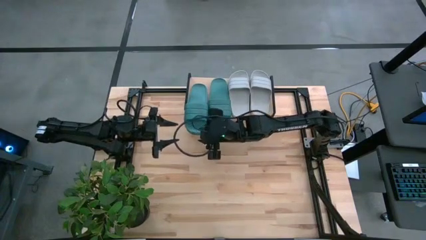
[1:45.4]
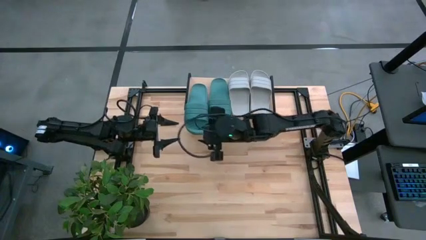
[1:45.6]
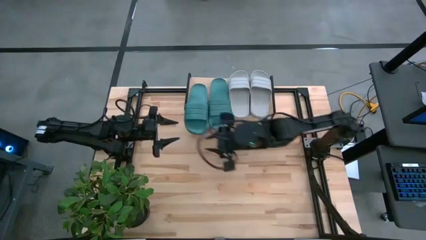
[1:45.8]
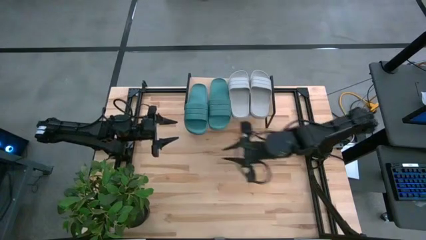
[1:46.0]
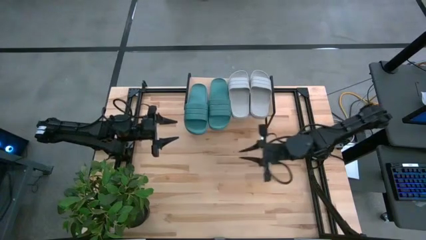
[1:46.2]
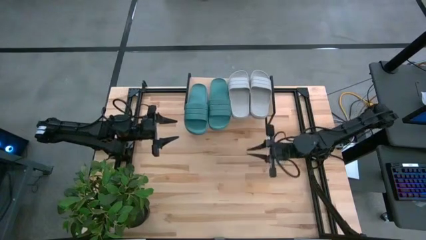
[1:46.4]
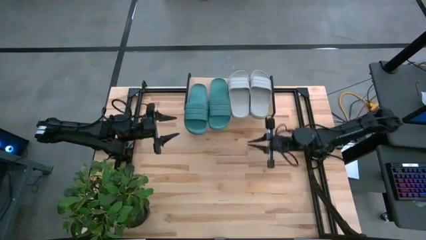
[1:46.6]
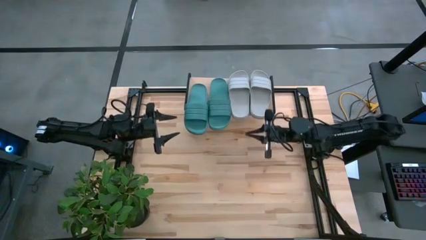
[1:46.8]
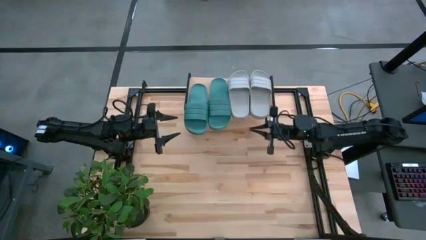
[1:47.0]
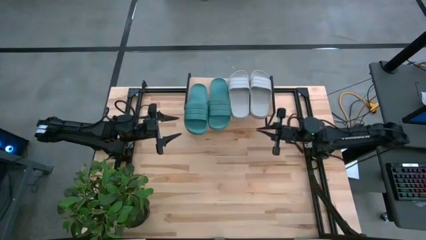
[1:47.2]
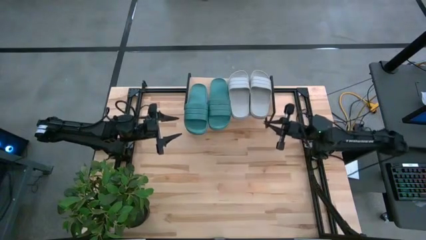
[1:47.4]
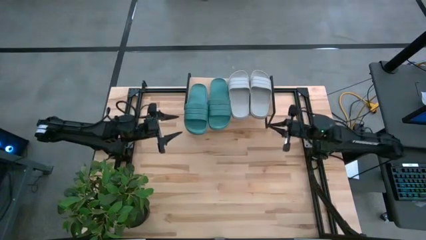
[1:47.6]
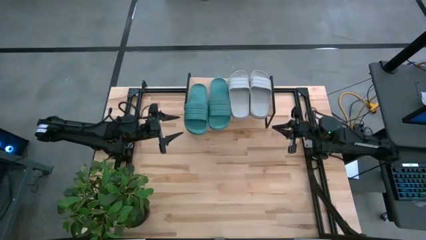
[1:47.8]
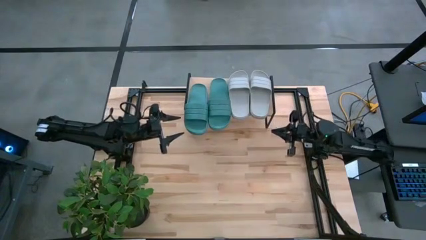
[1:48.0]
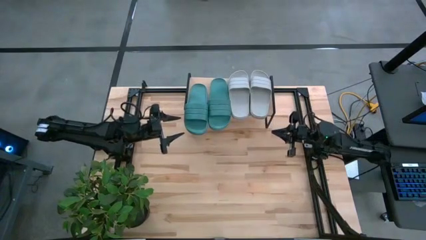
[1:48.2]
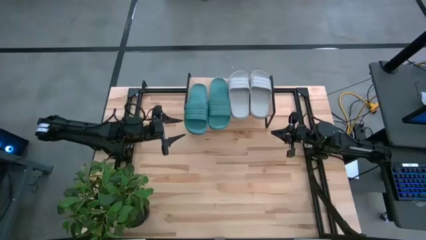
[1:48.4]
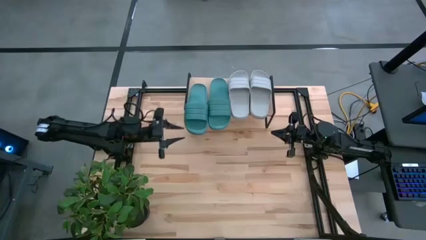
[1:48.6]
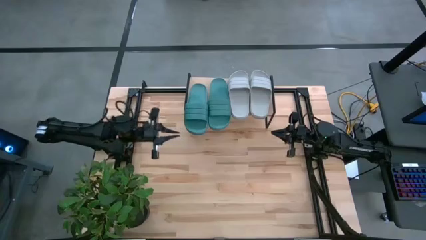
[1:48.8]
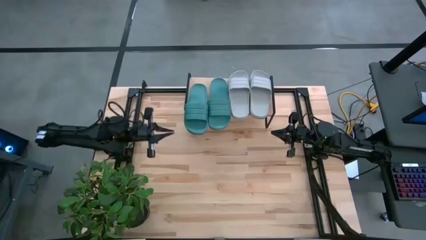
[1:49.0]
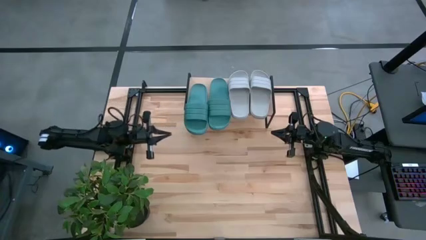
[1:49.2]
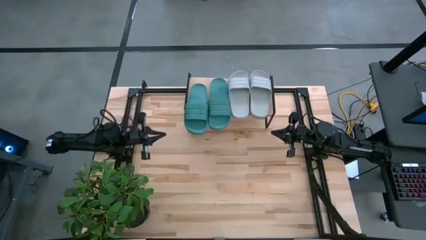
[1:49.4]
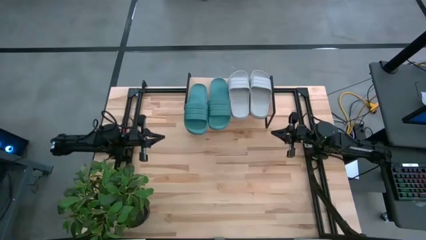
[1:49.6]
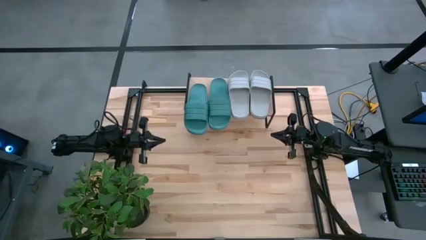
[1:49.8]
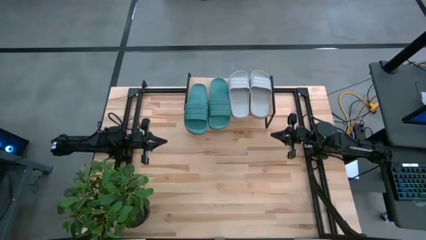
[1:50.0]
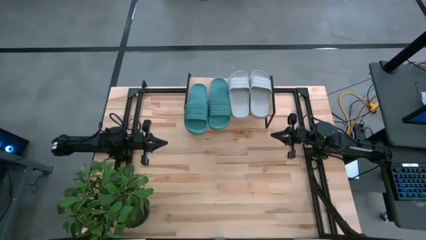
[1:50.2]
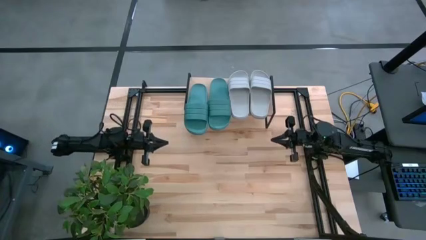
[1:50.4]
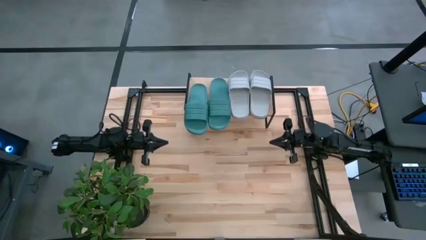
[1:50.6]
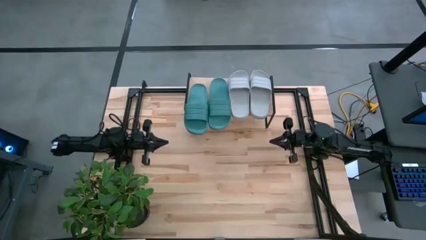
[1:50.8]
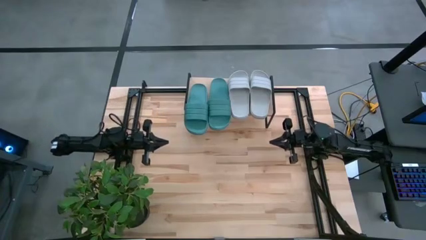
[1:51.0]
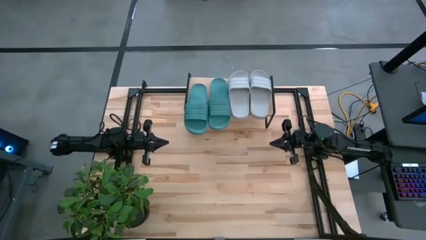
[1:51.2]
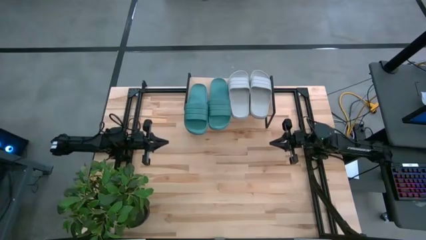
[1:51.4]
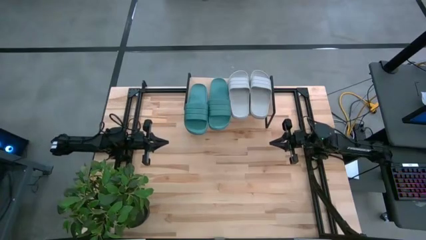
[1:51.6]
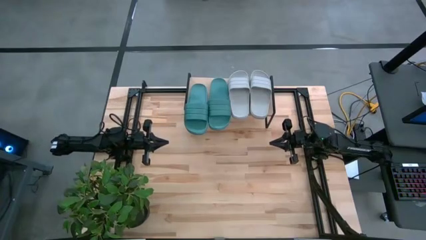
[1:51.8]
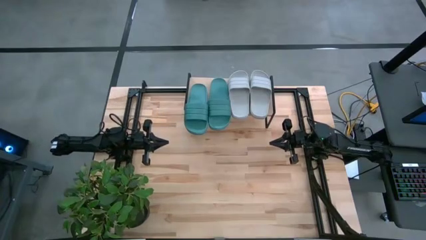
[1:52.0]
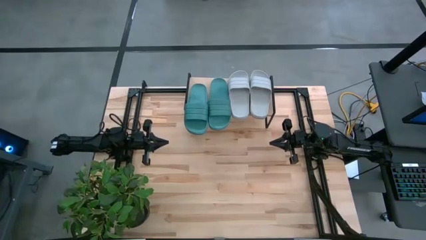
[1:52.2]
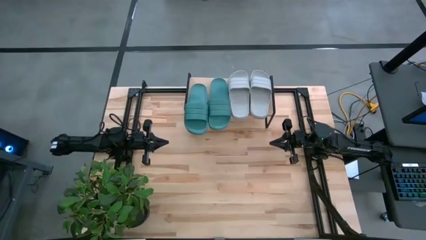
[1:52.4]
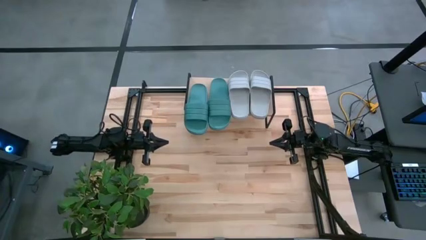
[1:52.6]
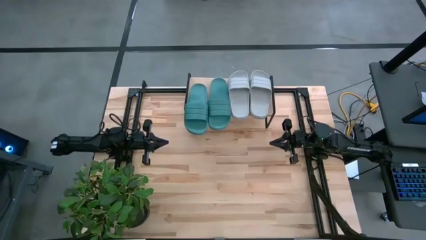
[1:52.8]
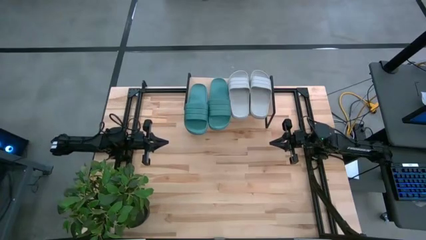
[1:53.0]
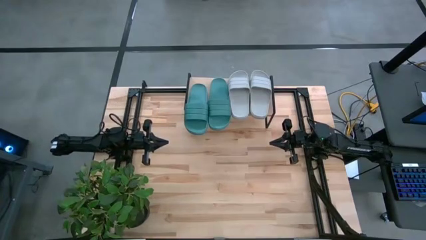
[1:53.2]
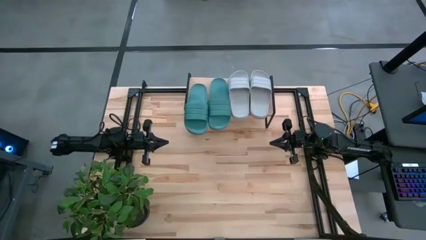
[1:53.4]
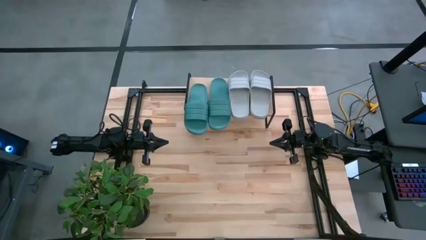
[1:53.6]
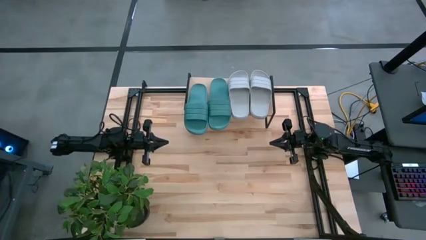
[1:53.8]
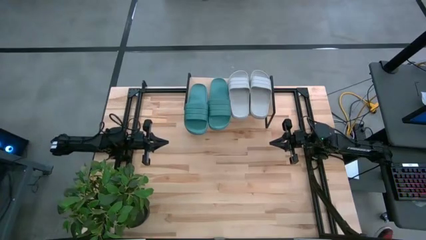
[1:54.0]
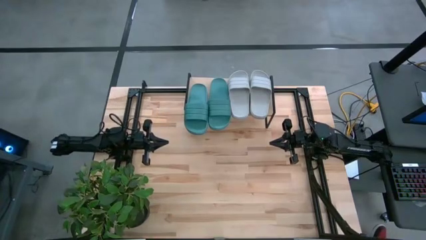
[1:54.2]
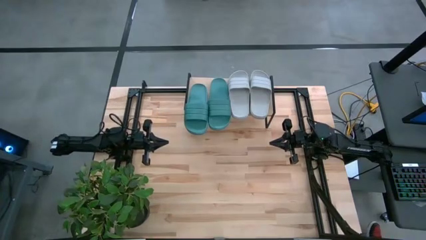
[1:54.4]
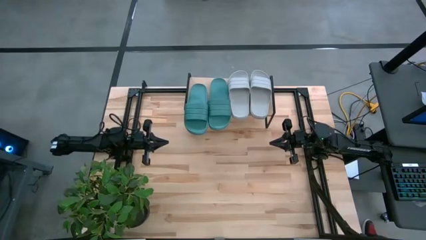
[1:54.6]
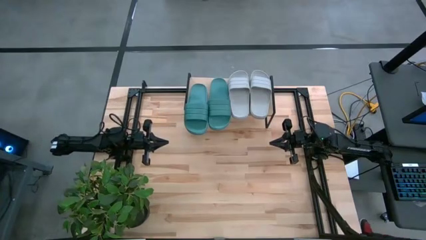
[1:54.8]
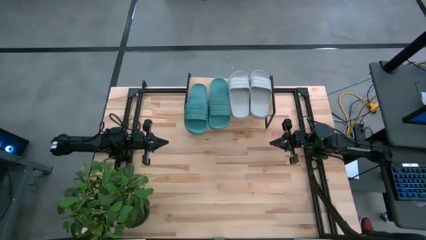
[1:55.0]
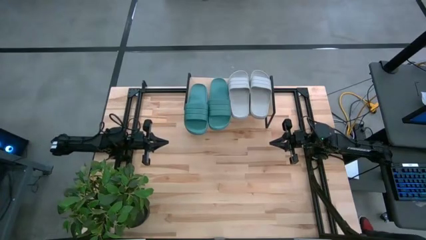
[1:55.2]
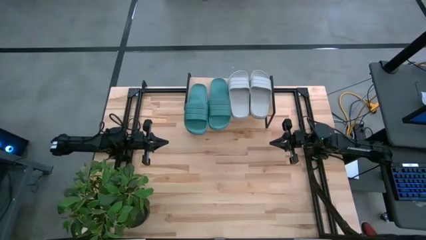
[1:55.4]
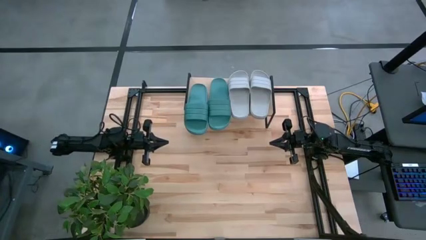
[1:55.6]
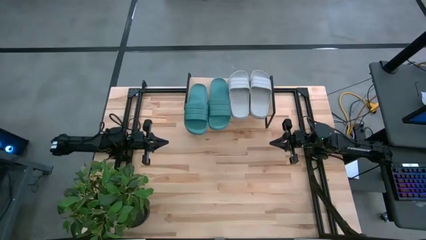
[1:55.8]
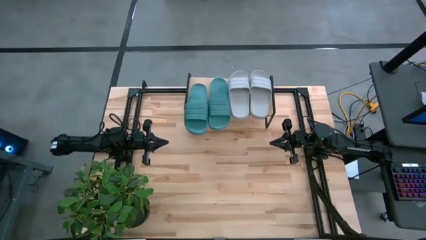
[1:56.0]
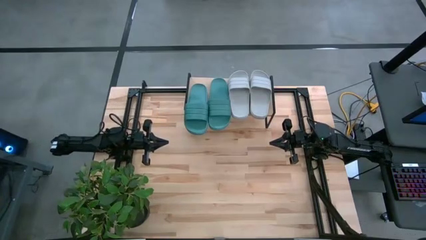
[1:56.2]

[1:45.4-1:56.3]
Task: Pick and place slides into the shelf
Return to Home Position

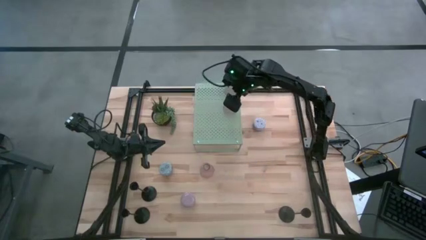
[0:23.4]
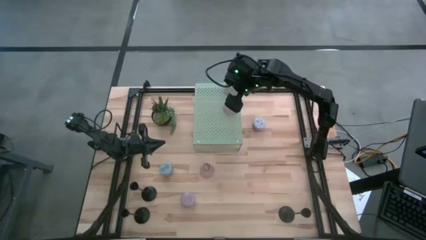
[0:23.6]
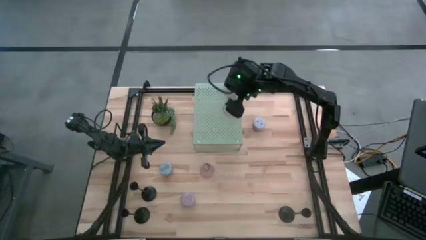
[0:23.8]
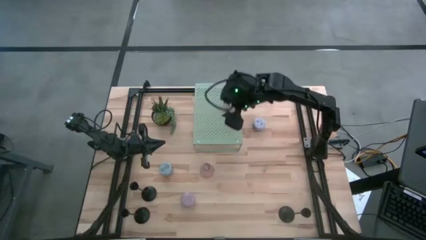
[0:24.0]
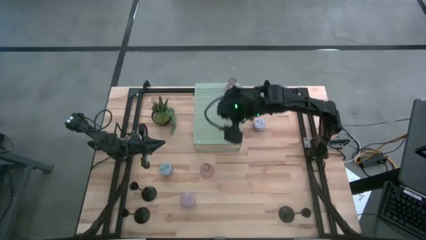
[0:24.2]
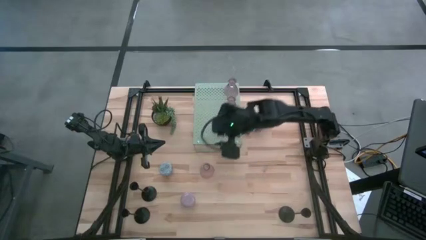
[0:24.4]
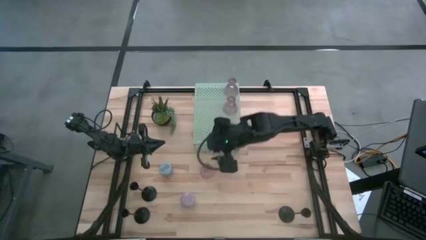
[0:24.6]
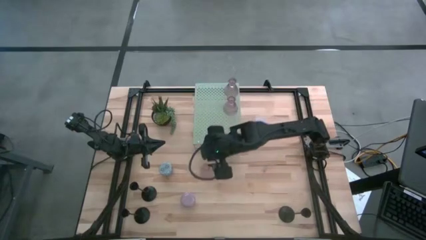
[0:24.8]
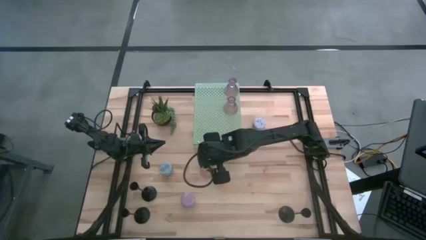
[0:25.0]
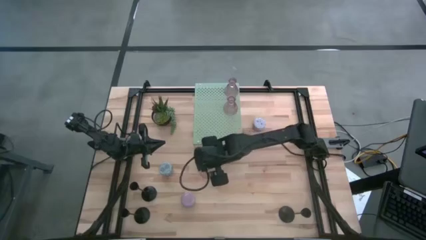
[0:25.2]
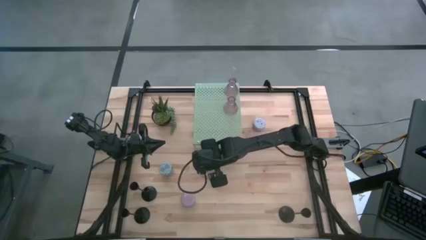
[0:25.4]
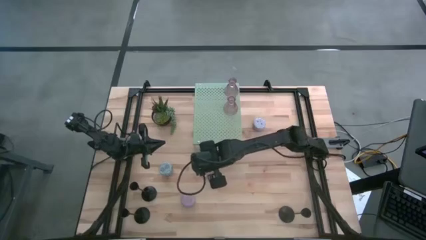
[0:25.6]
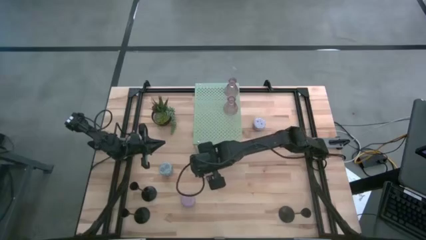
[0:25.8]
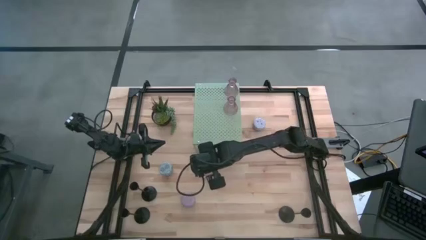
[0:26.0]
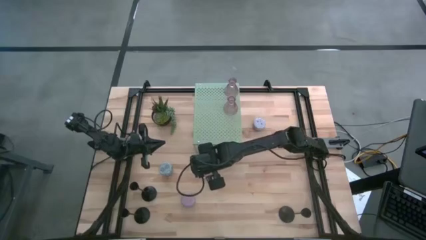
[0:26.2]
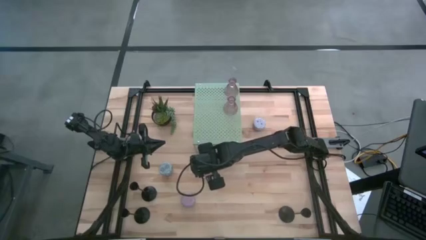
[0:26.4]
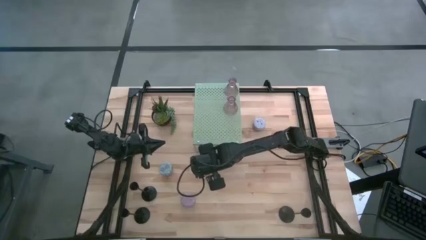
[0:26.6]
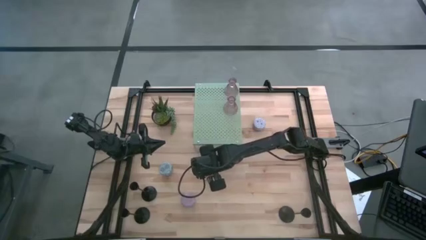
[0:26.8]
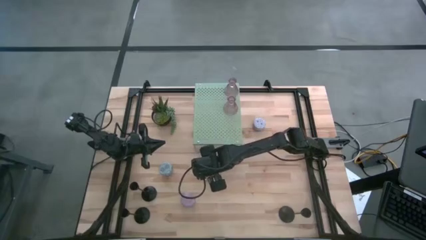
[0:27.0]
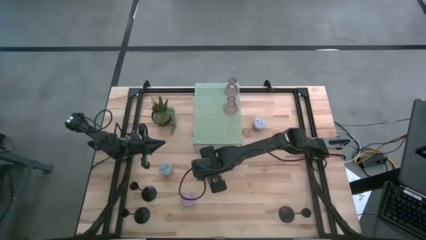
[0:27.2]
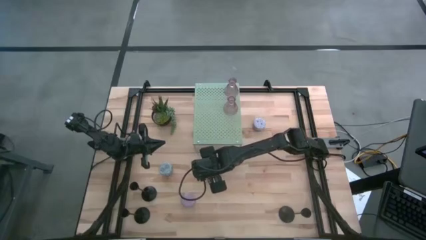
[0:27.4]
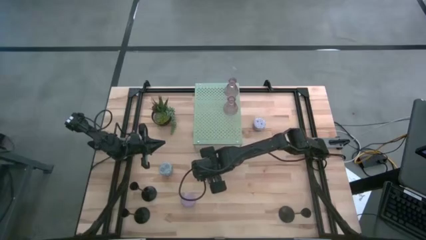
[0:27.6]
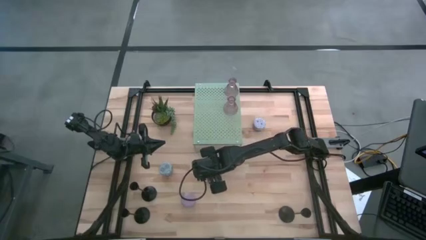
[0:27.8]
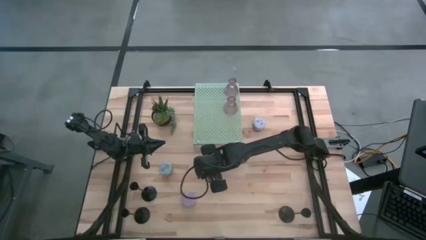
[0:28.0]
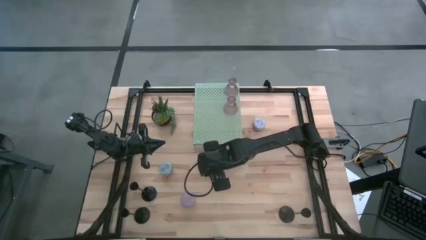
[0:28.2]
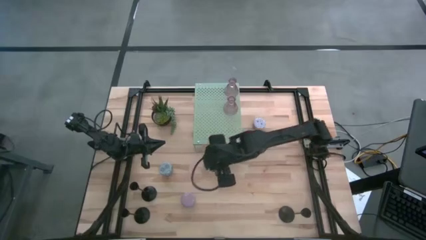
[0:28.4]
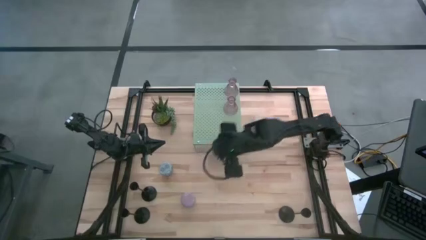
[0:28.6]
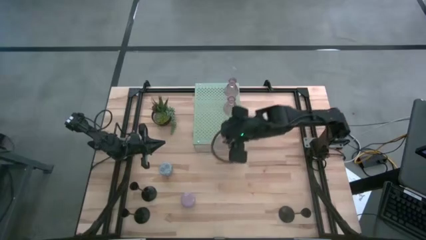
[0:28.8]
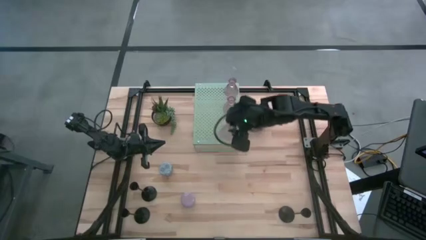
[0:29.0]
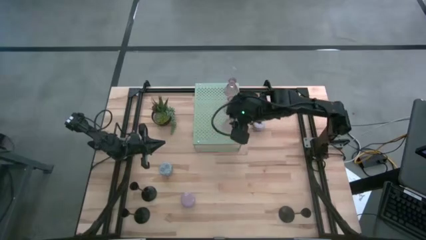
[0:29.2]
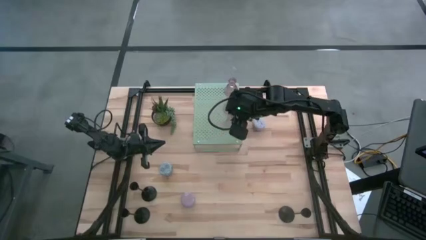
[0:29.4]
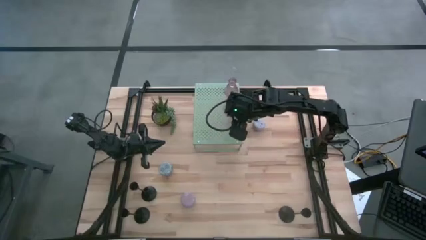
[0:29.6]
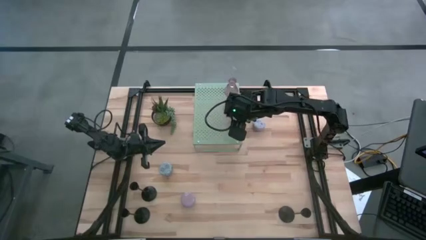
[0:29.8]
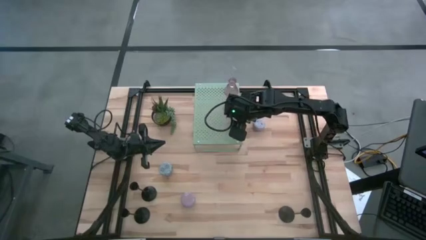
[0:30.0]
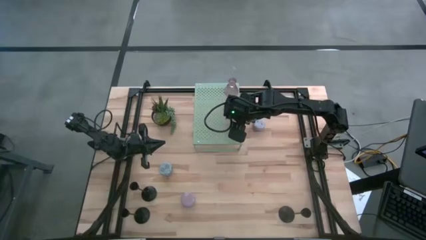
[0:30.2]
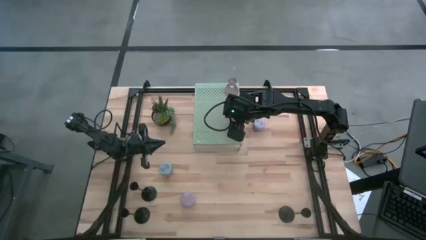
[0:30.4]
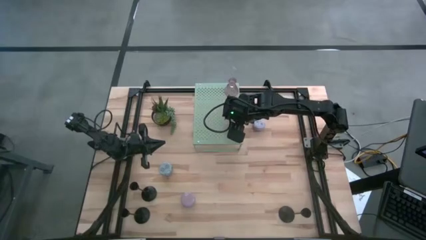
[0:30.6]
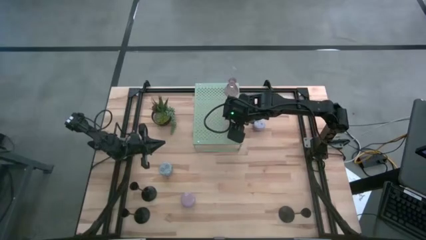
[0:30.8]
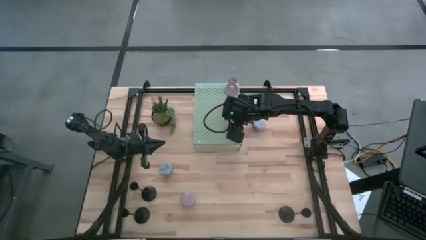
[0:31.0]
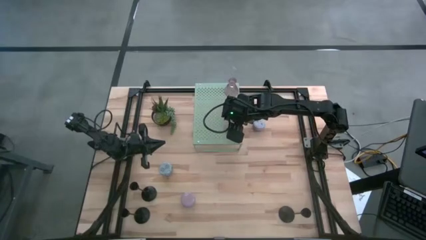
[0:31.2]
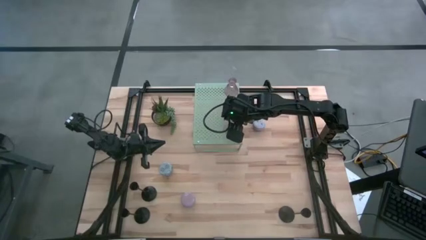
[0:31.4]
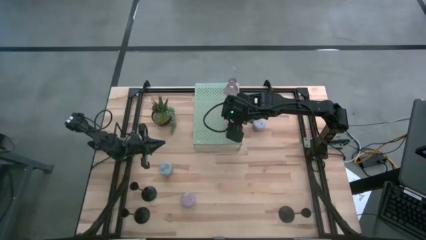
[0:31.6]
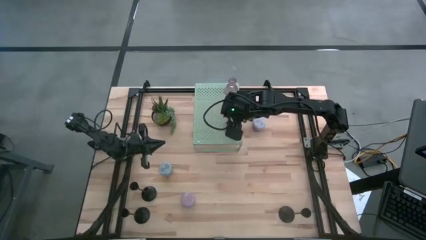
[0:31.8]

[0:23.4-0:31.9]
Task: Pick & Place candle stick holders
Put the pink glass candle holder on the shelf aligned with the other pink glass candle holder
